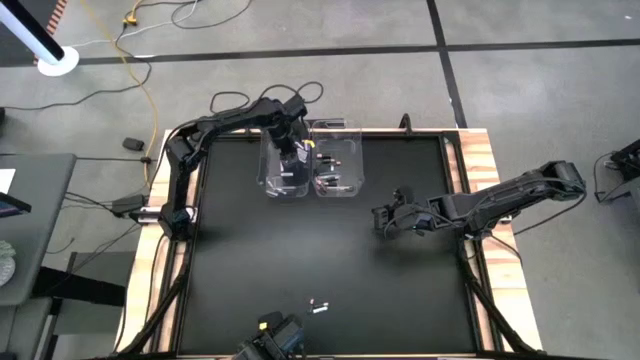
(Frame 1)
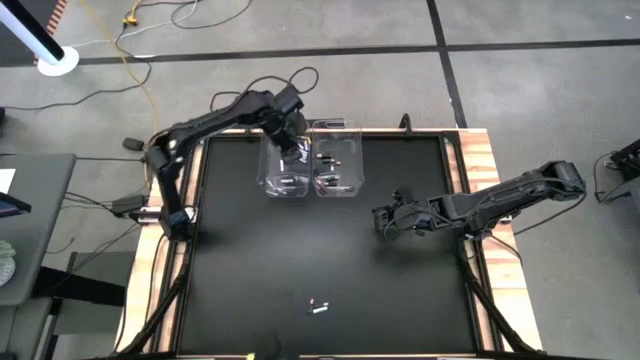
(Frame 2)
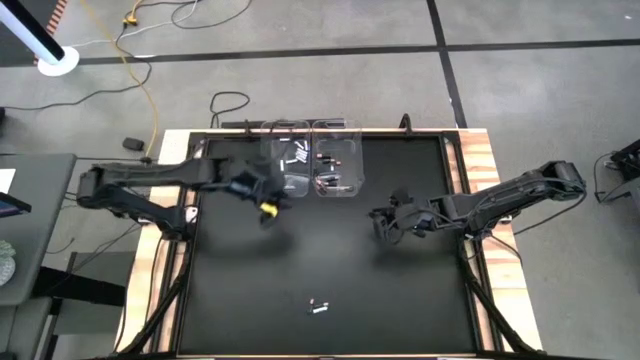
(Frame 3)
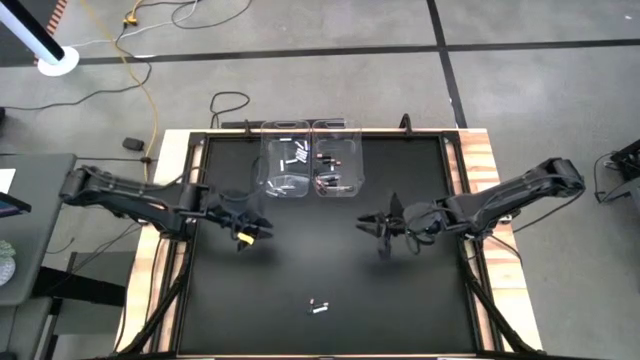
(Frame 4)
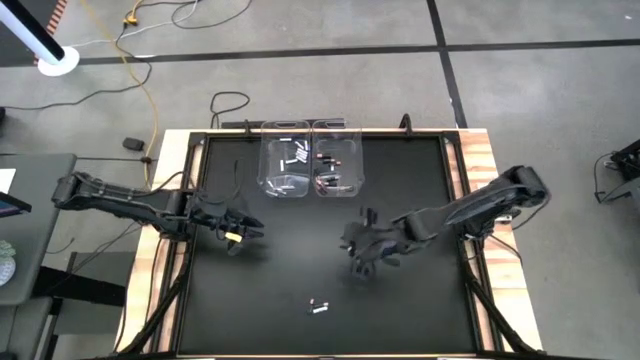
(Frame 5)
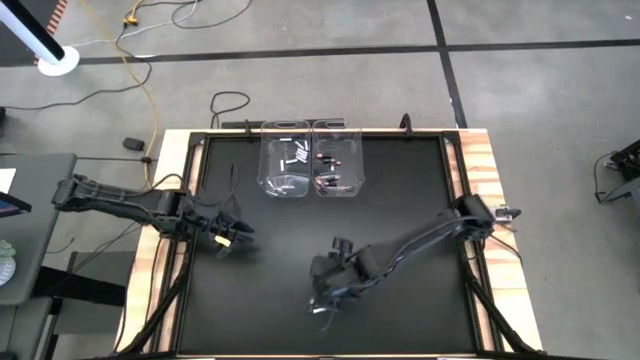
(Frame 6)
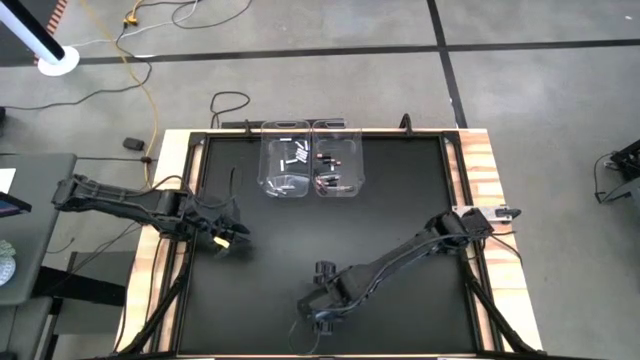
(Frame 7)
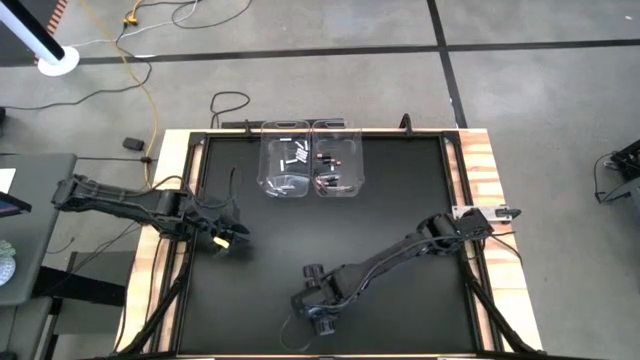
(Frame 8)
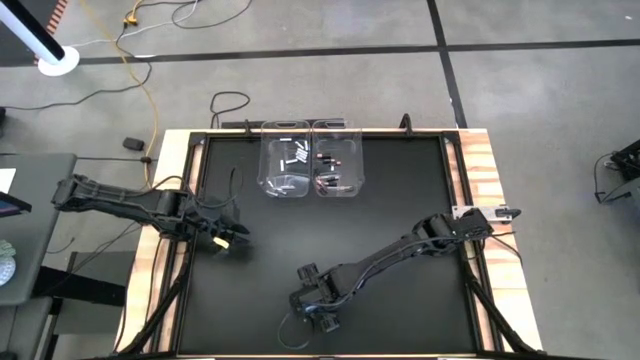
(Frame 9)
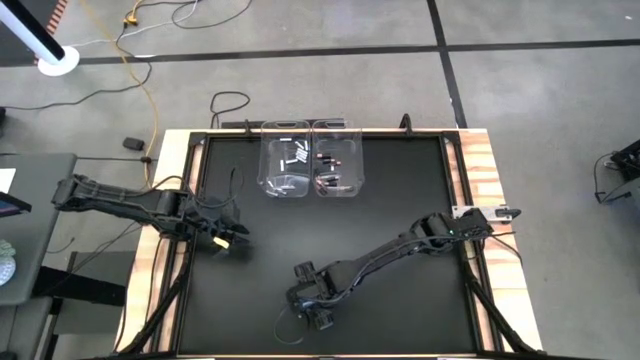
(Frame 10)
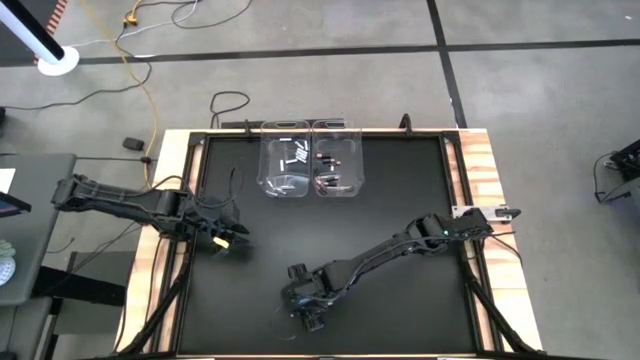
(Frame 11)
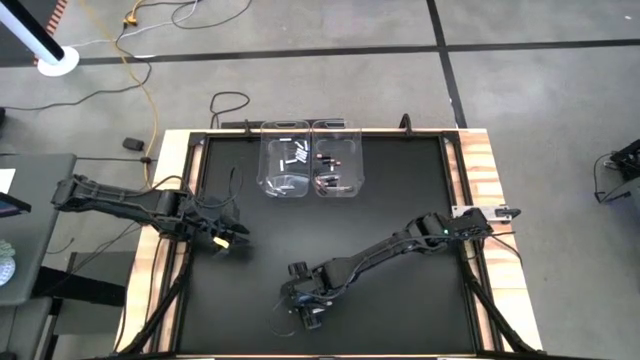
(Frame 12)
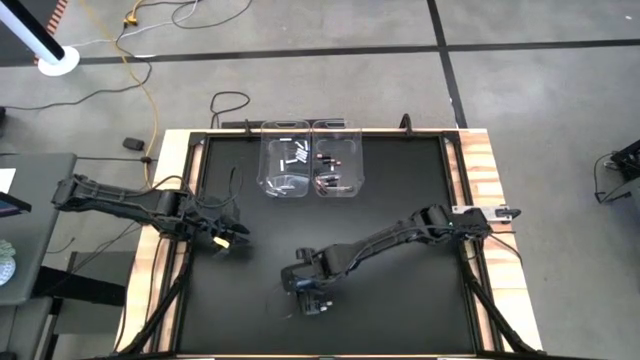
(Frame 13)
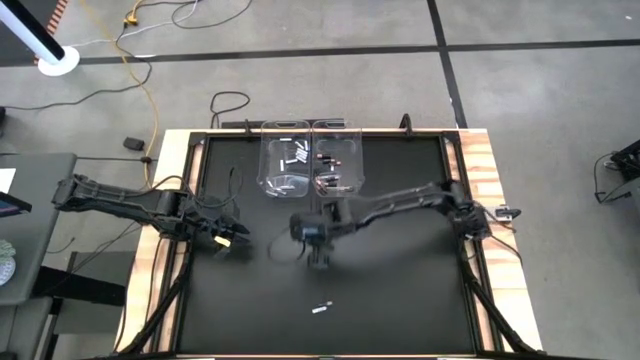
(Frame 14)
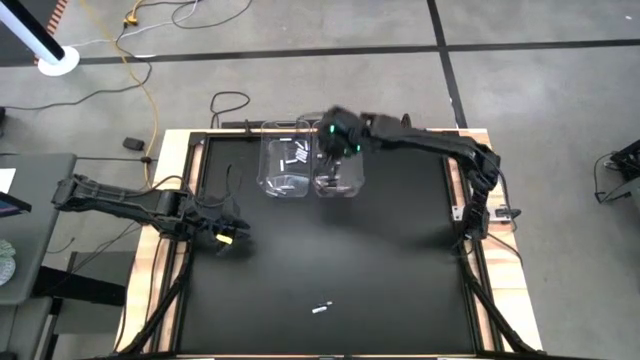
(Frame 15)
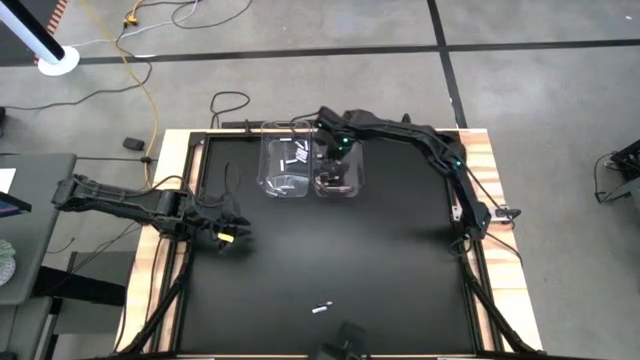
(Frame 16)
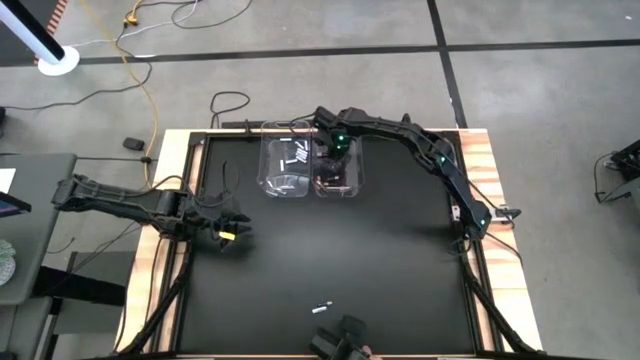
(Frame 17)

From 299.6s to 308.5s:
Task: Sort batteries
Put the black battery into the right transparent bin

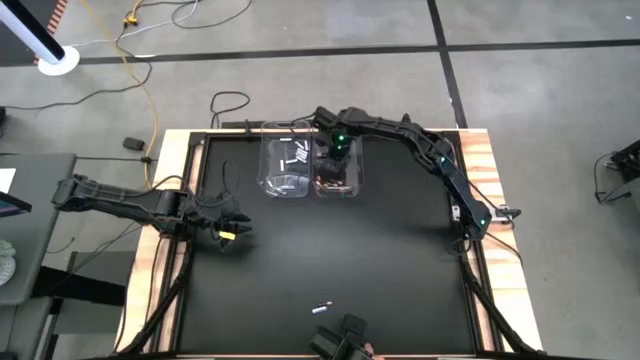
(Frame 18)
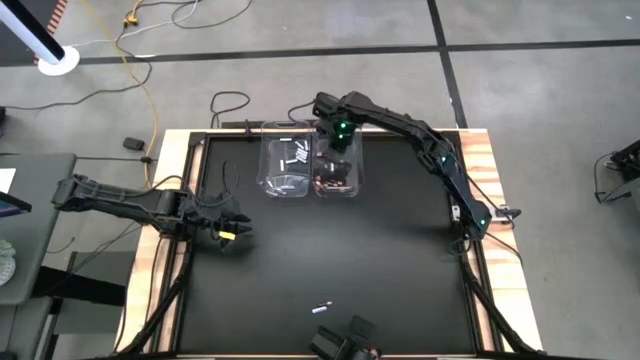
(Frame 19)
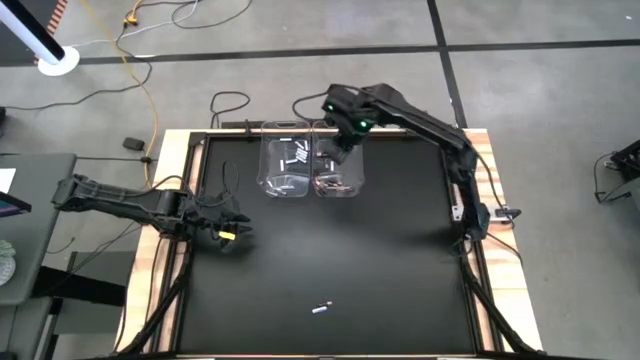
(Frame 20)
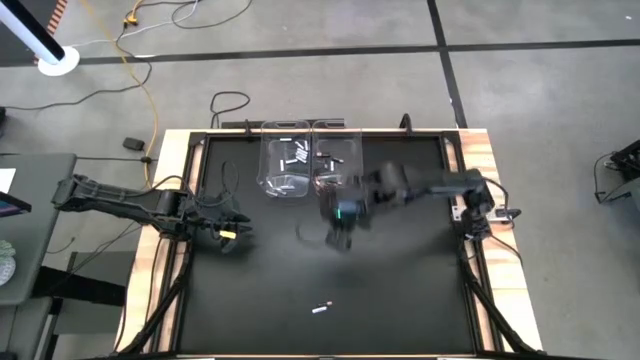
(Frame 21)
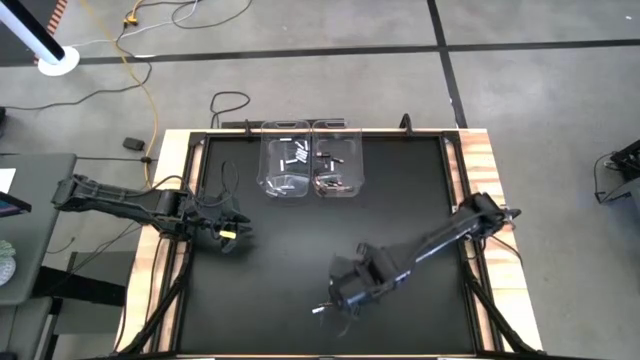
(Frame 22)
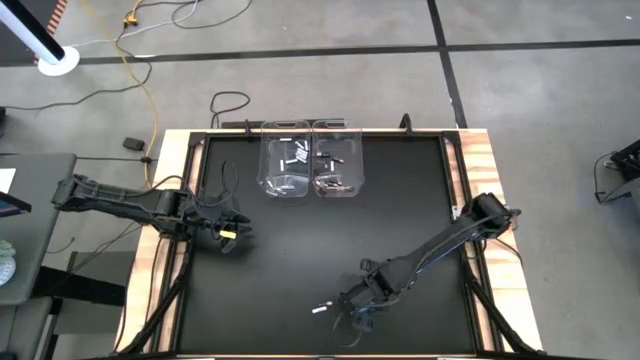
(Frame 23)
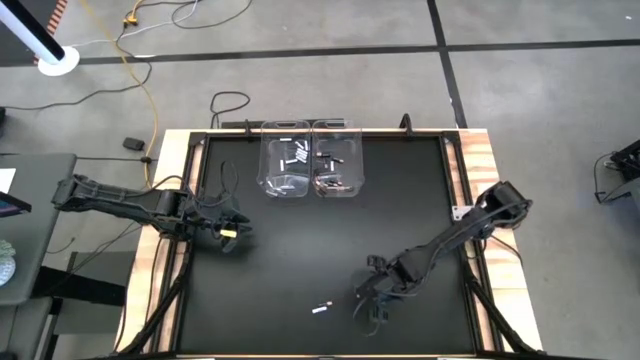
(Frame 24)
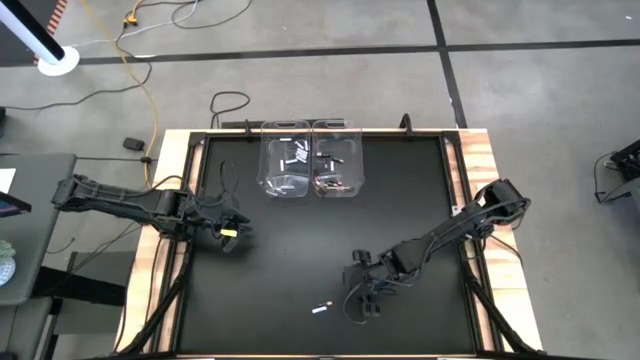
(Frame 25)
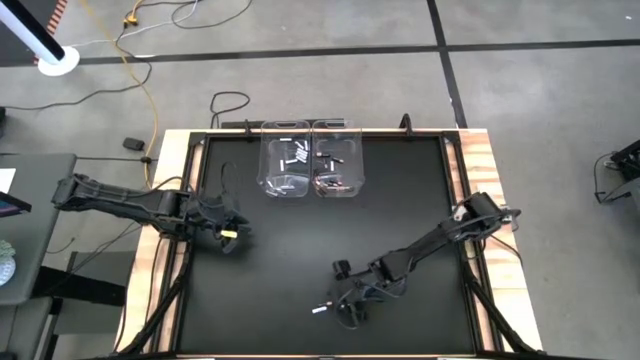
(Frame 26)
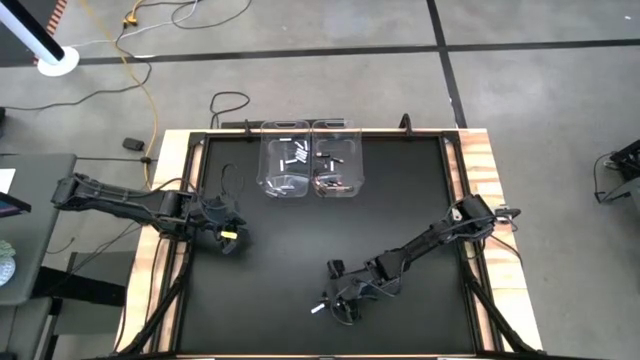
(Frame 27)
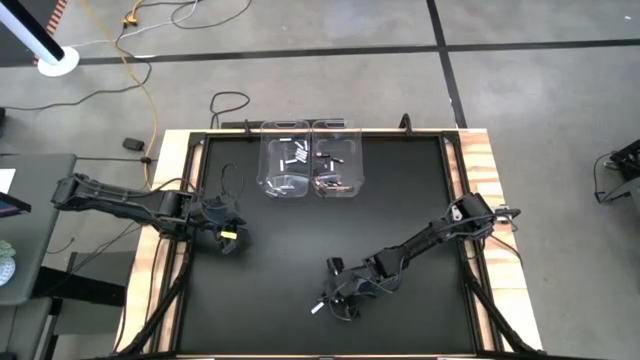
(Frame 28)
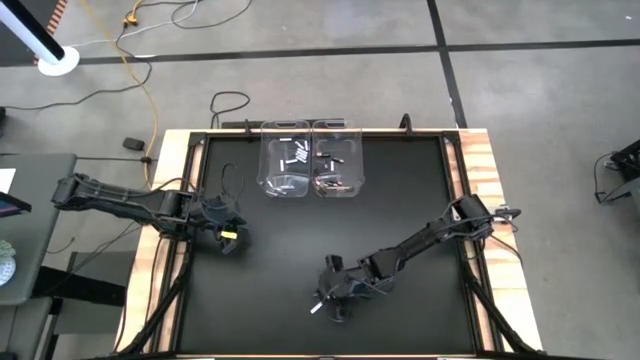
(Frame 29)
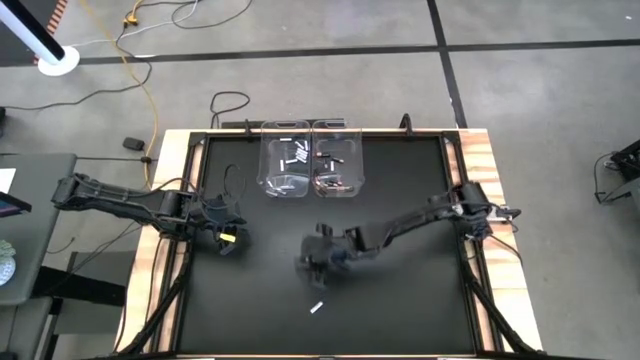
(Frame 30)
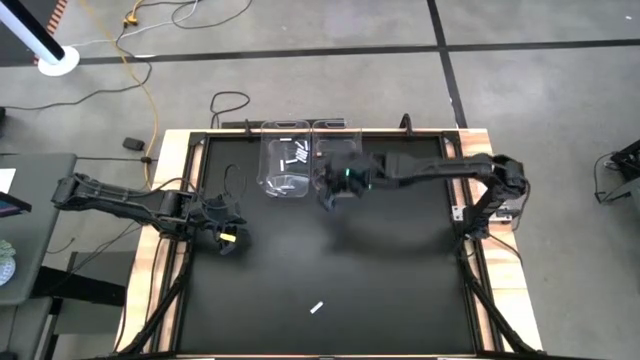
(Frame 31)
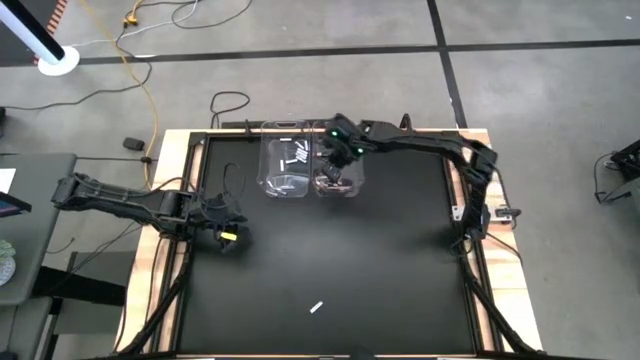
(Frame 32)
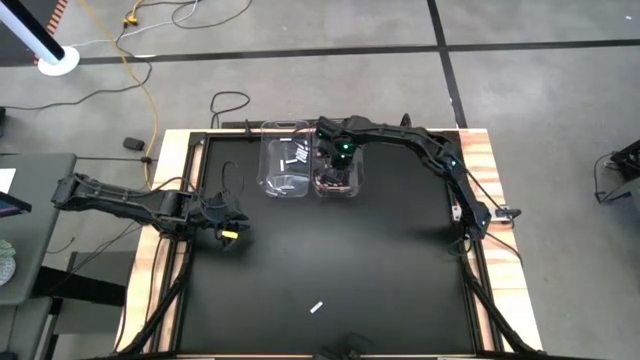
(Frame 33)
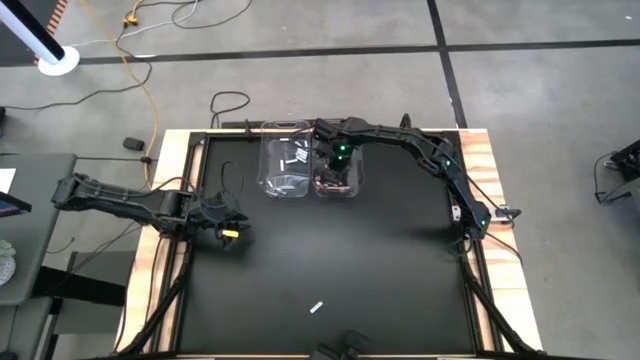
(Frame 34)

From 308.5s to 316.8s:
Put the black battery into the right transparent bin

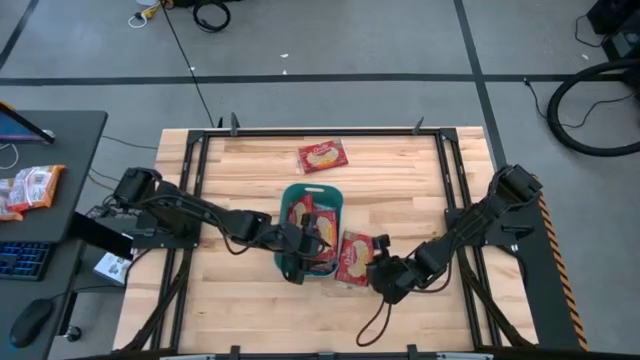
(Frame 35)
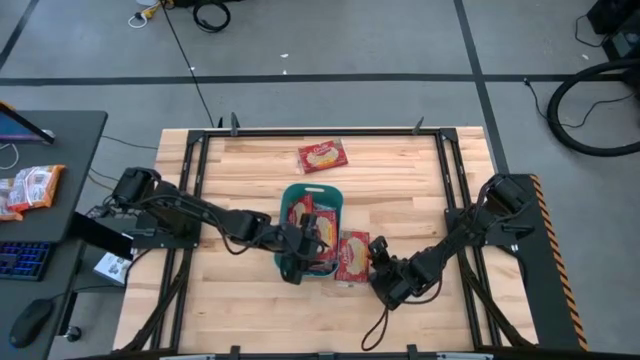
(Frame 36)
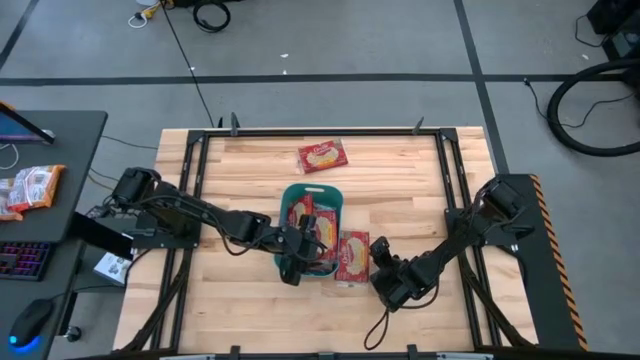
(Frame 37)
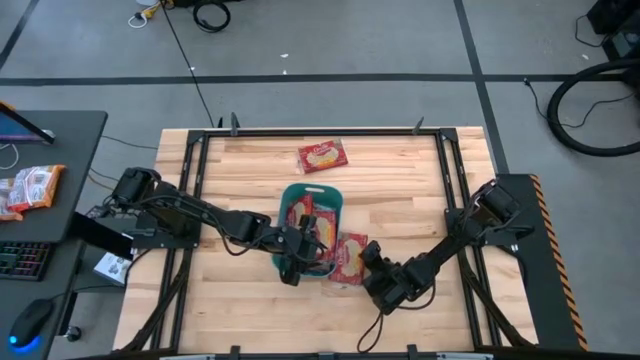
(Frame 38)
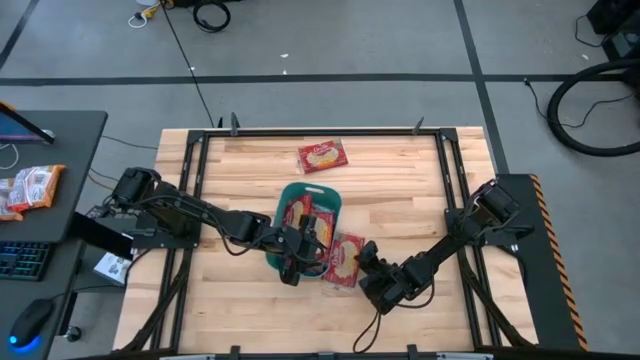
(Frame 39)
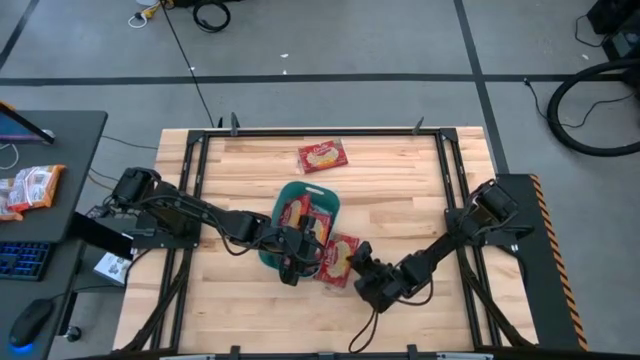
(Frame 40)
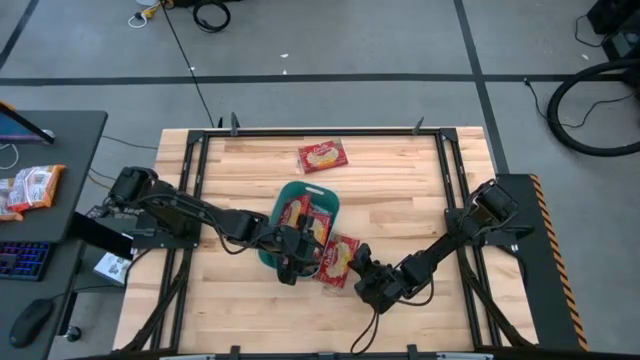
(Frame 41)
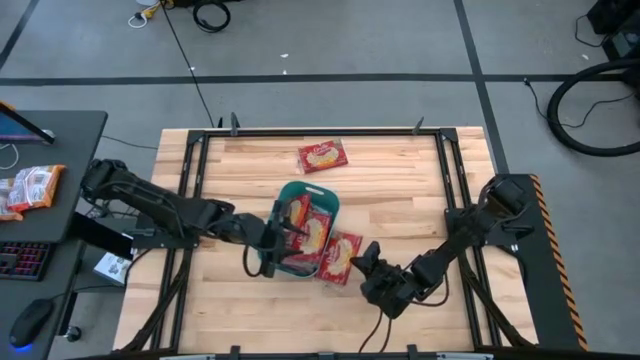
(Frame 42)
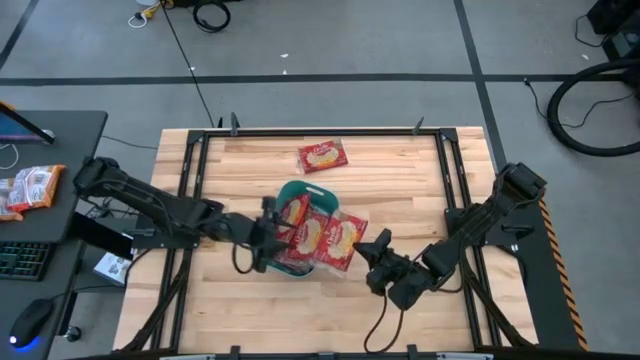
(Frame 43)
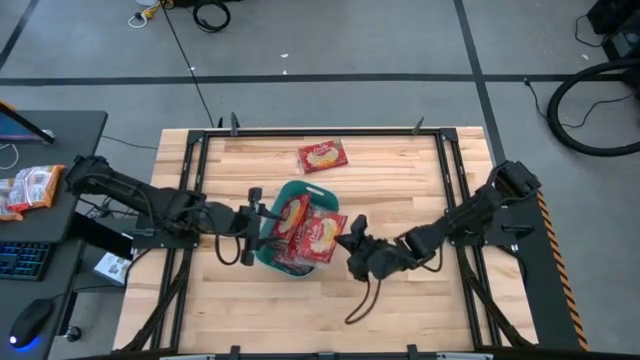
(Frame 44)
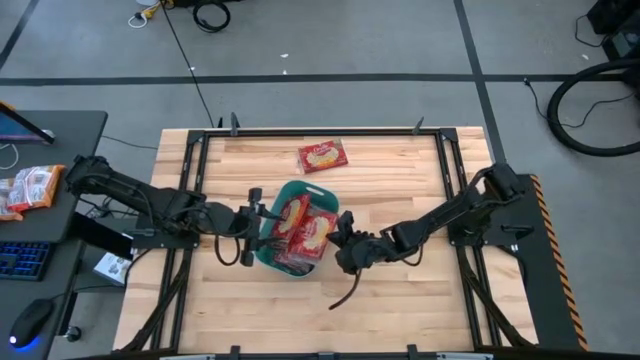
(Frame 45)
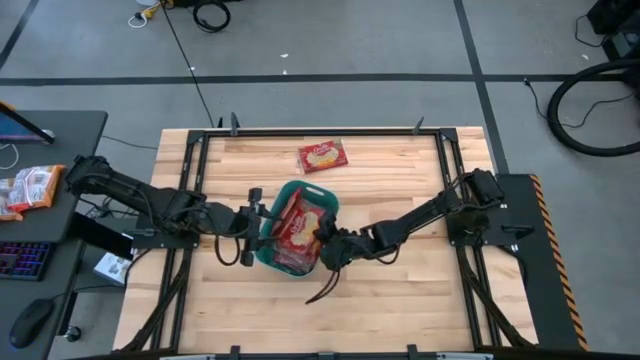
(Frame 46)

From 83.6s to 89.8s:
Task: Sort popcorn bags into baskets
Put the red popcorn bag into the green bin
